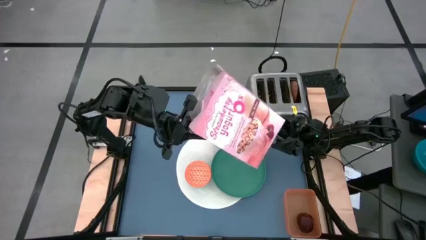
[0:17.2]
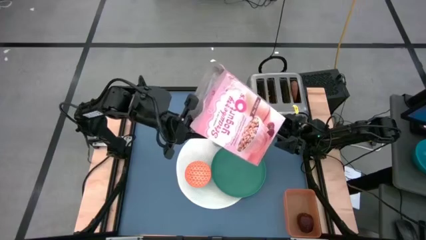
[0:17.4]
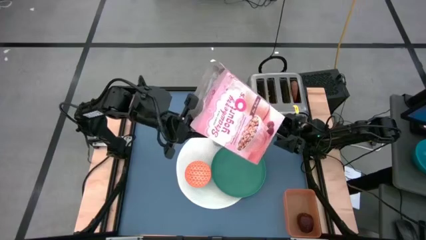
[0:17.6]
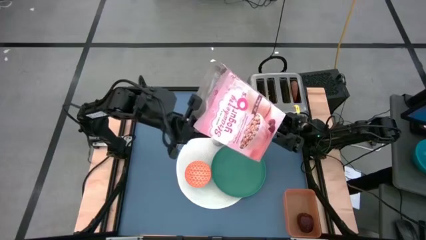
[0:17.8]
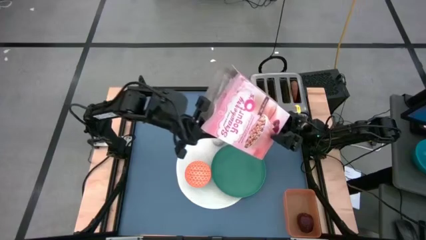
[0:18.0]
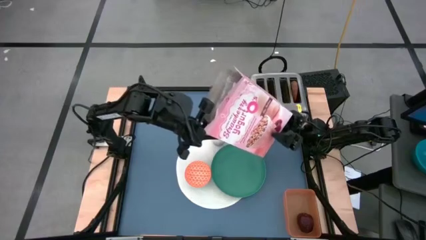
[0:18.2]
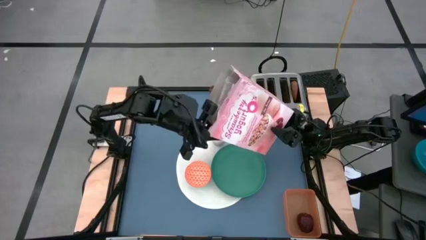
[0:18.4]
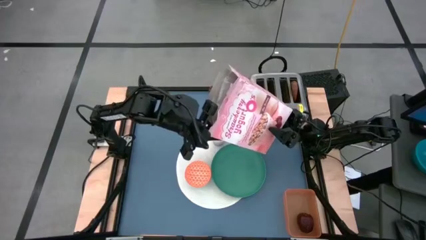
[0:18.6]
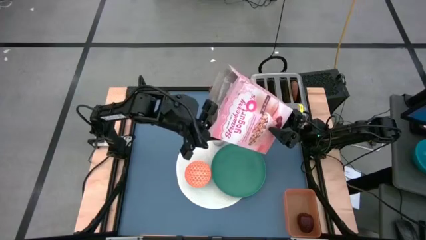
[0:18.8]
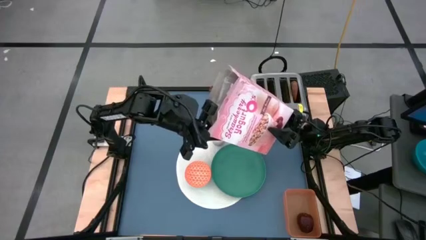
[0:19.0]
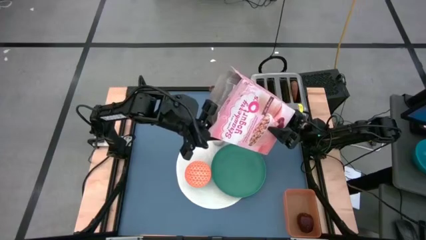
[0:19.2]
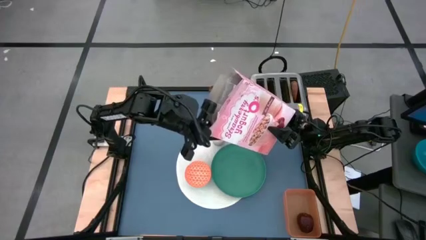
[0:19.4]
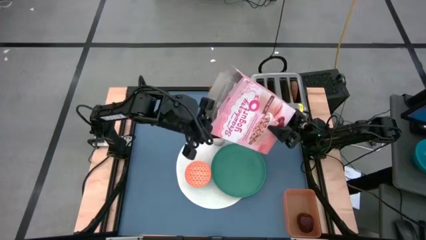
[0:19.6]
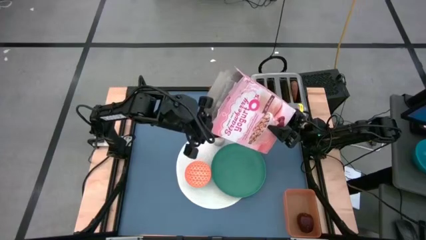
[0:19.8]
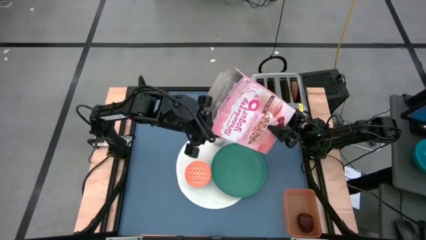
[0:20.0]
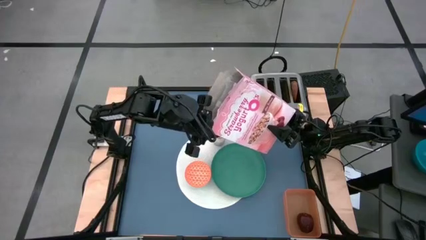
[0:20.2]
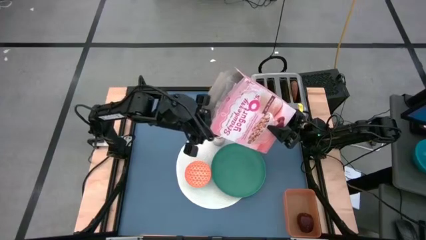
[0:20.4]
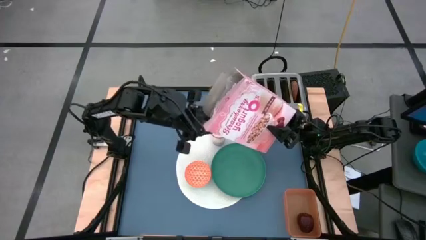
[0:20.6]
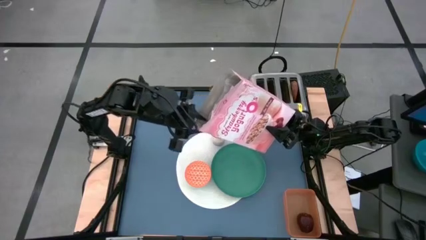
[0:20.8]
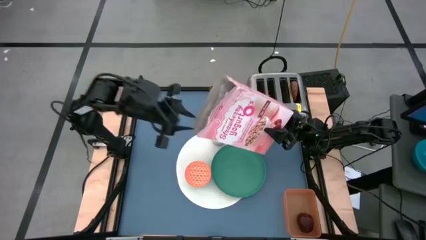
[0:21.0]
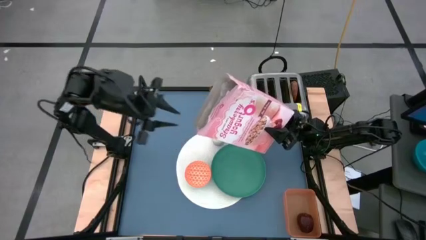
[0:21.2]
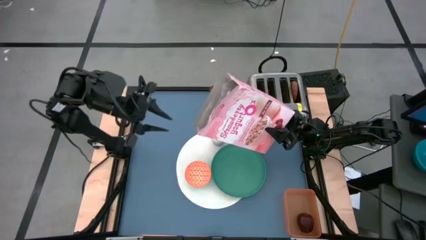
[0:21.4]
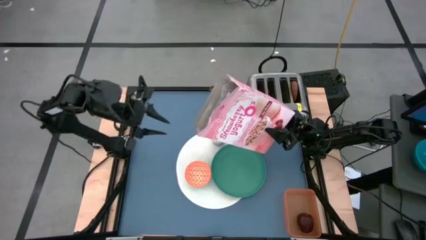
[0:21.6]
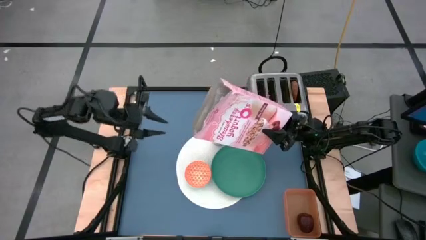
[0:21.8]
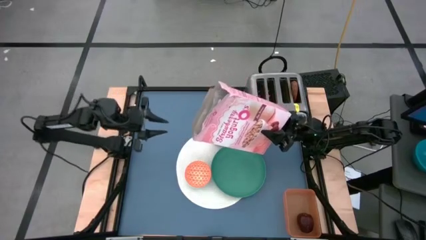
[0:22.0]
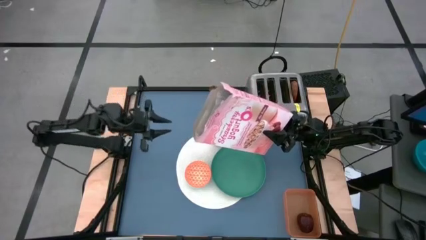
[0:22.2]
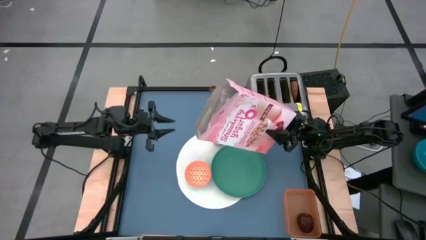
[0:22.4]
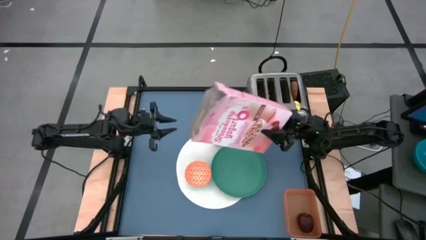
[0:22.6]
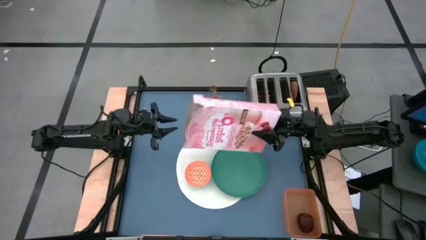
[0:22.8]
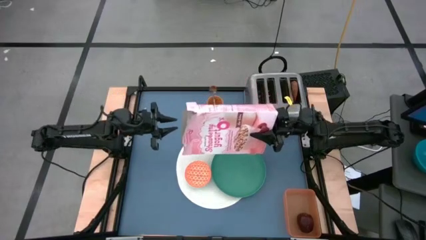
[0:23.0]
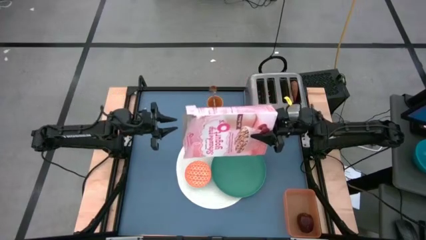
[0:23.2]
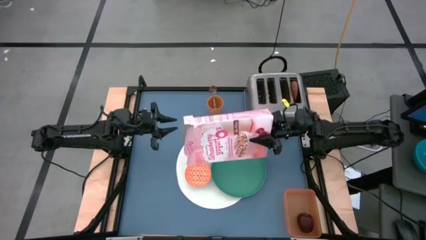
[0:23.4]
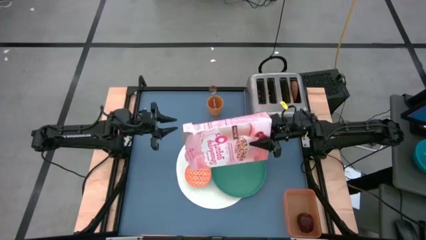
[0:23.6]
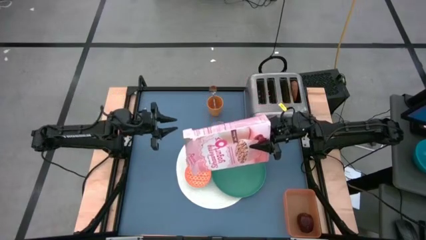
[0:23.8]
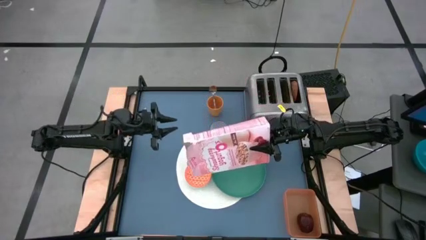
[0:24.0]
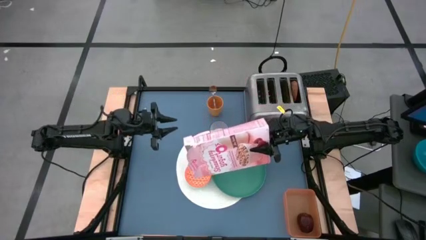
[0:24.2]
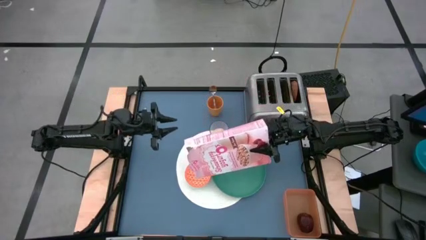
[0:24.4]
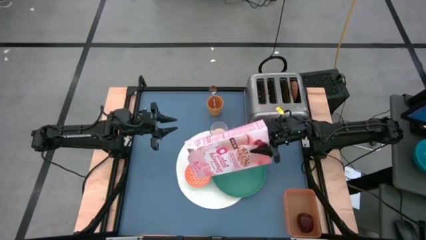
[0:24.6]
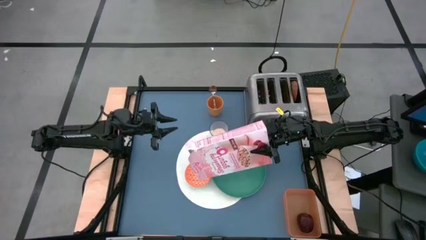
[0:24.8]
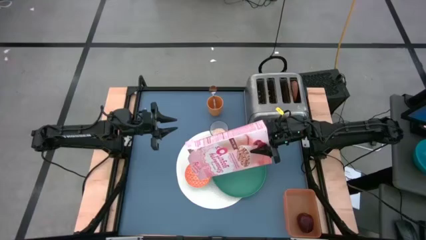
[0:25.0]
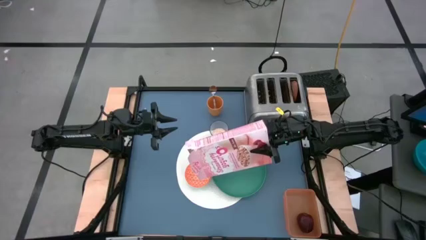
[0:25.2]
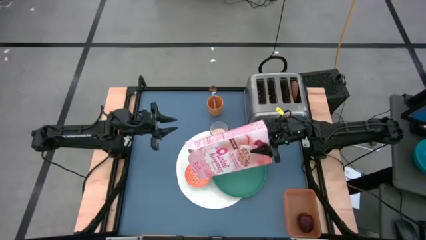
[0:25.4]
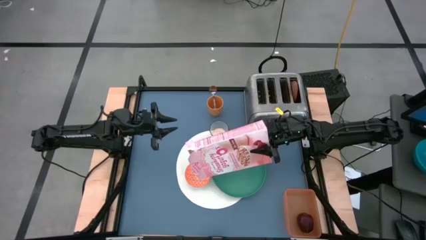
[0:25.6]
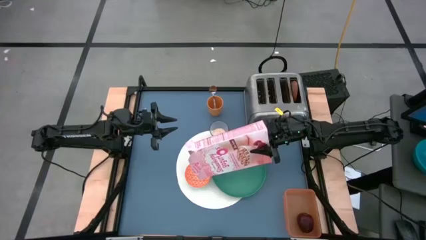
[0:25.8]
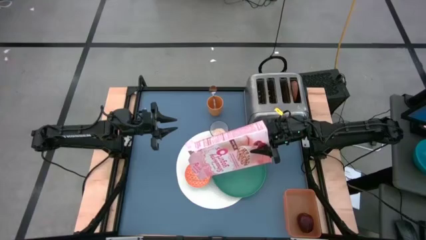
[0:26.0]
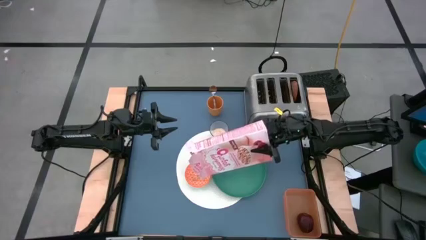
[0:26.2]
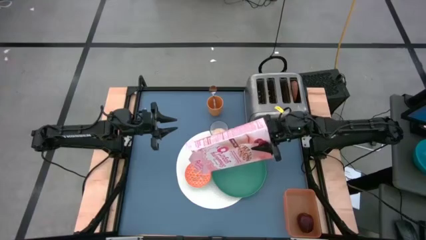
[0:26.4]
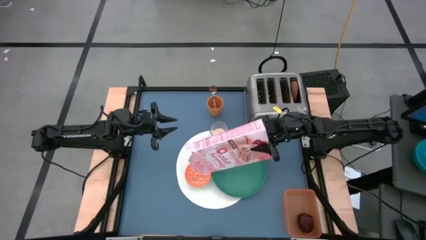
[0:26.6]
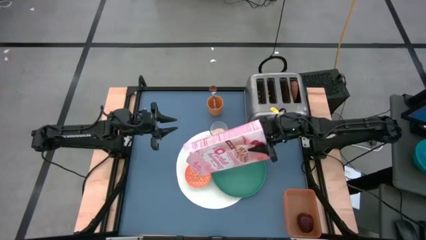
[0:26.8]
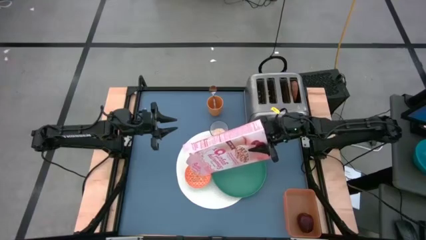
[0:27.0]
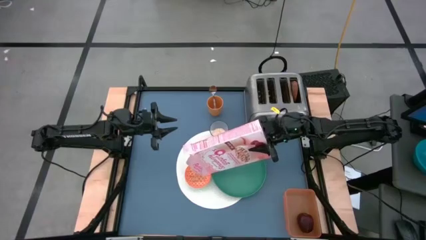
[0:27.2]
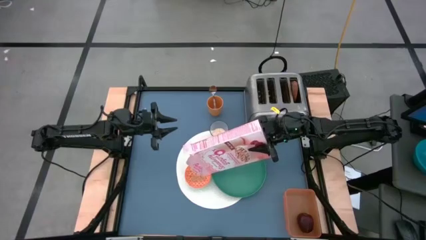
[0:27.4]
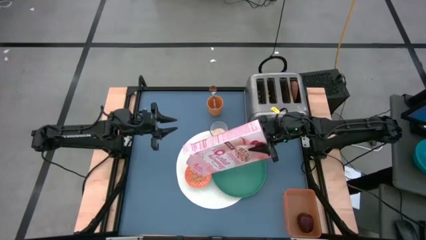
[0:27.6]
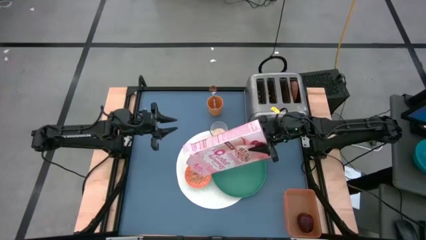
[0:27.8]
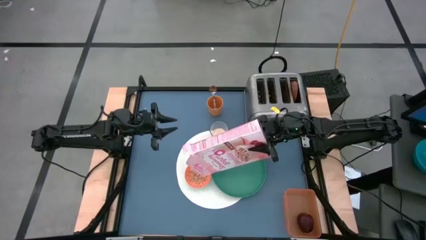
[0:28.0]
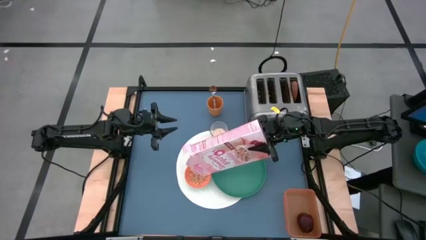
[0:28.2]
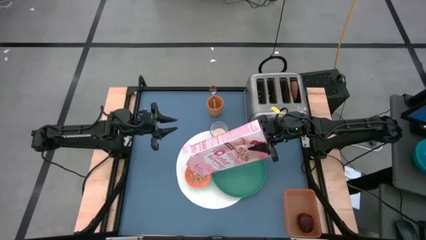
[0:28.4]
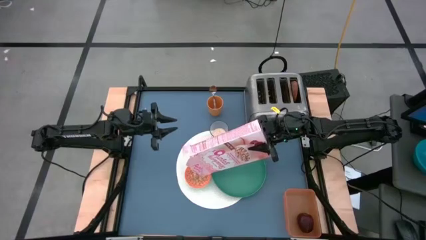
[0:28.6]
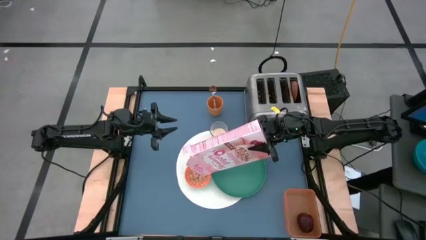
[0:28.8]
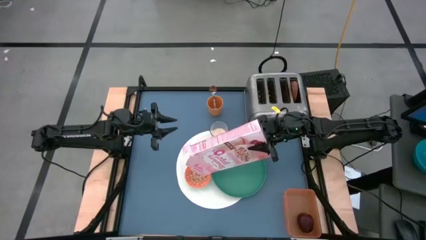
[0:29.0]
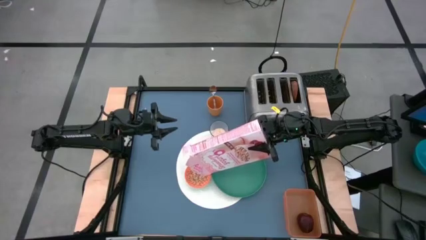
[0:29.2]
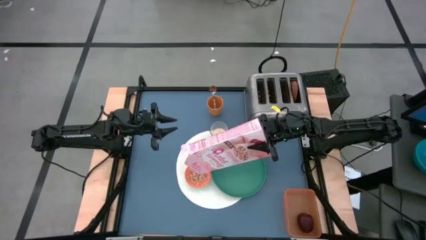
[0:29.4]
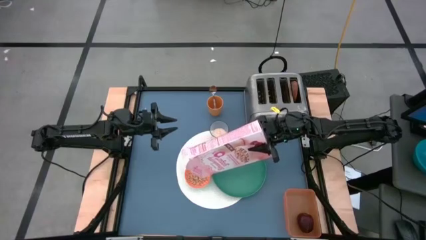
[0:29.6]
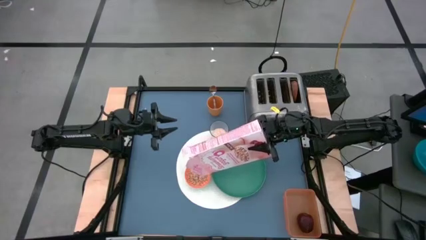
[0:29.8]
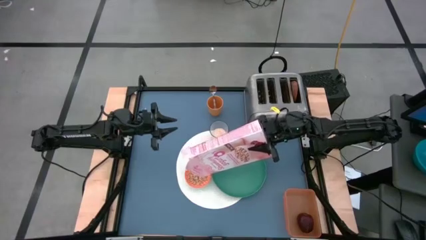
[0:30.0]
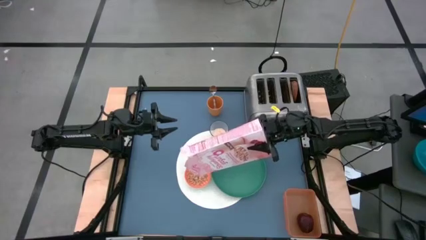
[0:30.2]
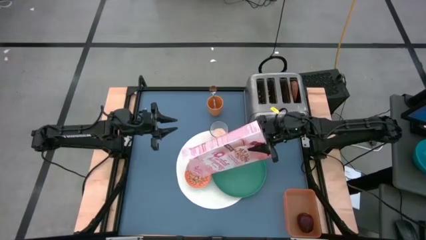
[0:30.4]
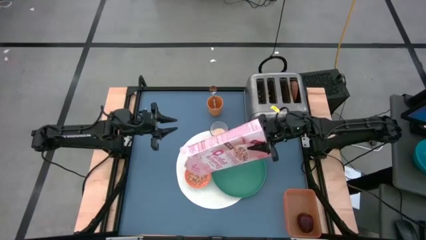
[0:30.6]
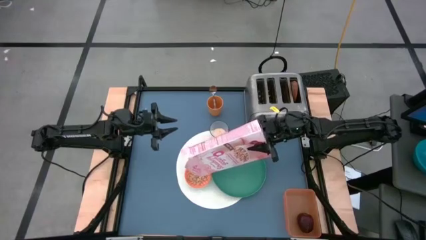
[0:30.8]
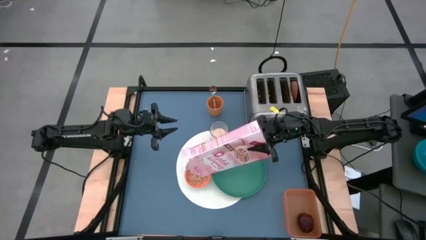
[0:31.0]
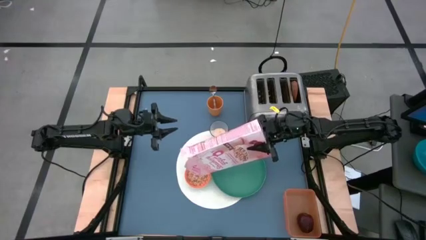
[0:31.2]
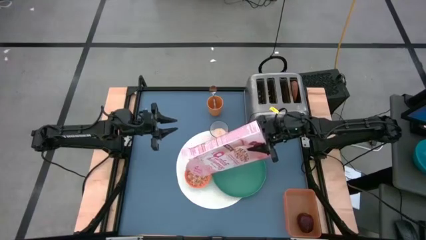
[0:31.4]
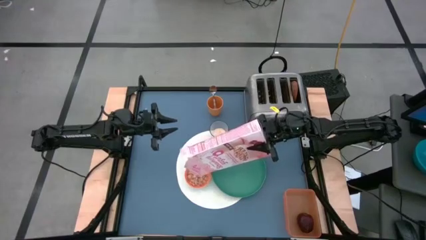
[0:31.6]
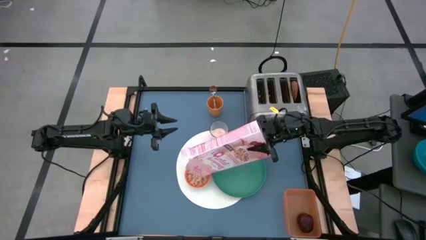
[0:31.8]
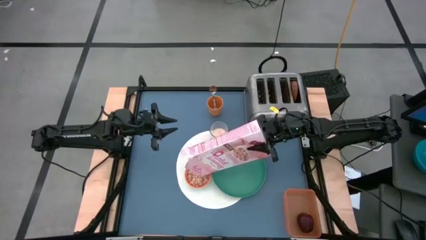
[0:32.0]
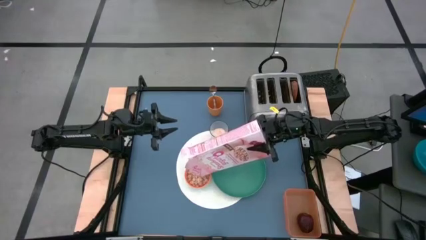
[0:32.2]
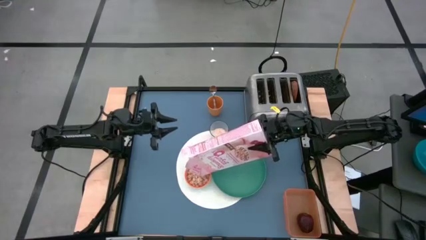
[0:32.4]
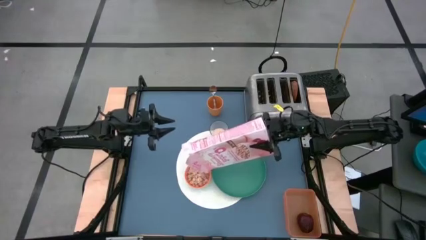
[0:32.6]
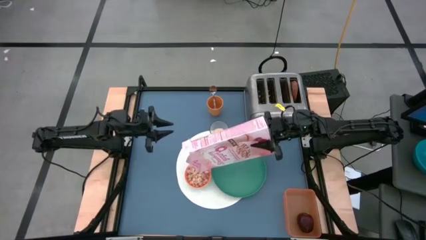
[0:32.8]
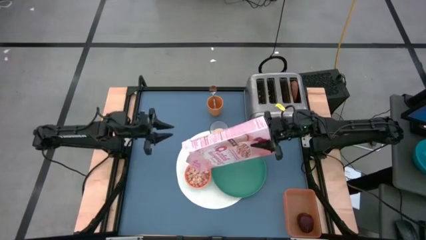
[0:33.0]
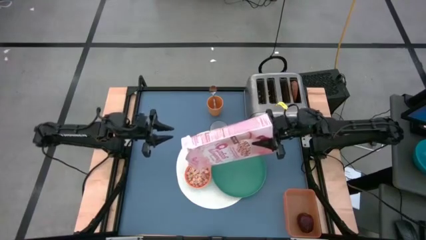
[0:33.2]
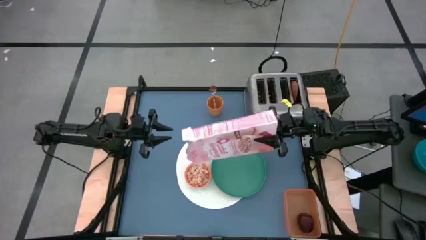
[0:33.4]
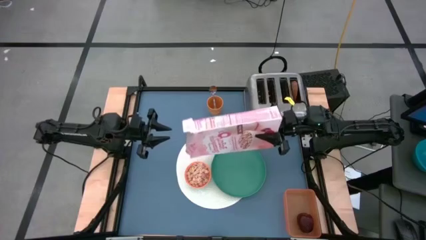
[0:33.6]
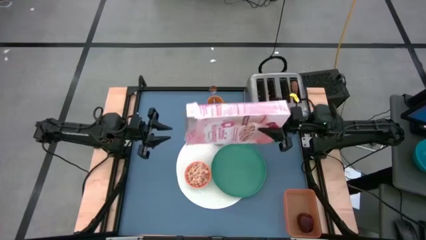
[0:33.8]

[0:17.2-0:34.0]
Task: Arrange a breakfast setting
Pour the cereal into the orange bowl
